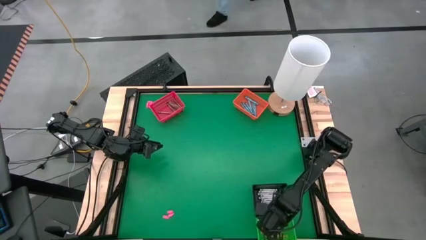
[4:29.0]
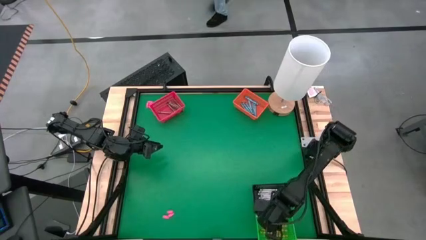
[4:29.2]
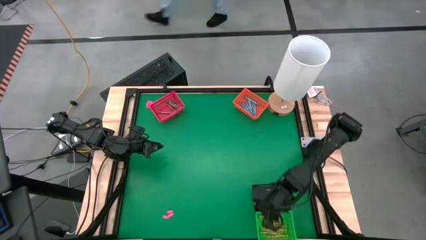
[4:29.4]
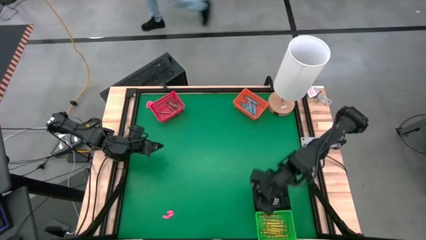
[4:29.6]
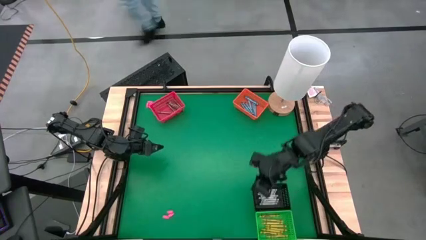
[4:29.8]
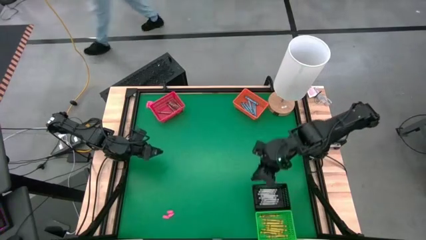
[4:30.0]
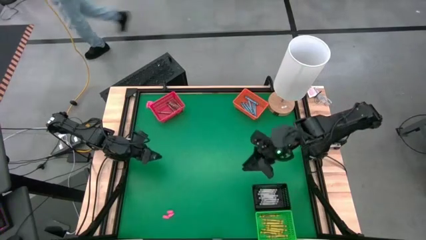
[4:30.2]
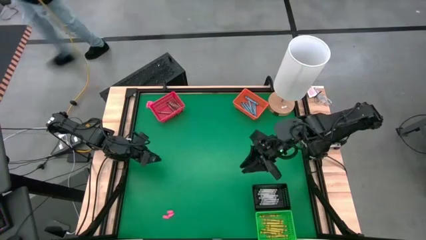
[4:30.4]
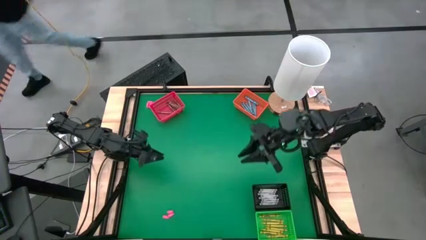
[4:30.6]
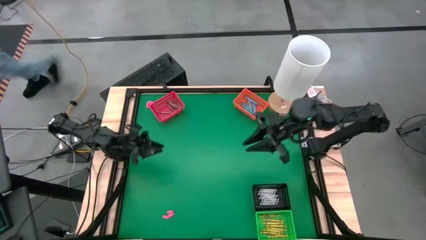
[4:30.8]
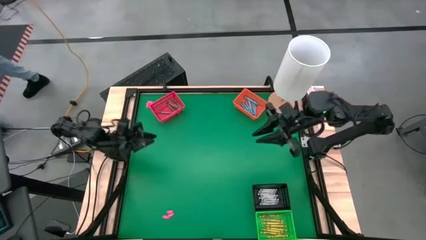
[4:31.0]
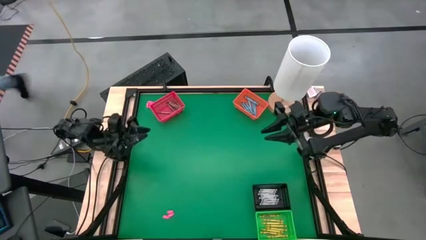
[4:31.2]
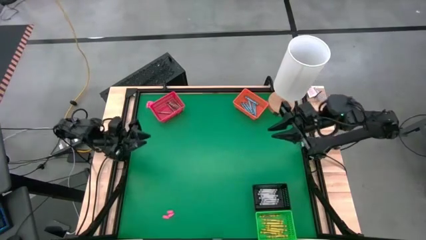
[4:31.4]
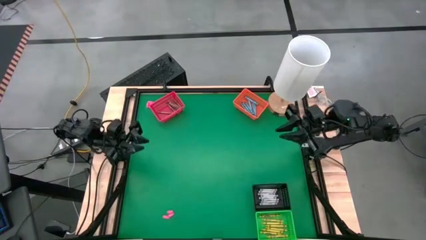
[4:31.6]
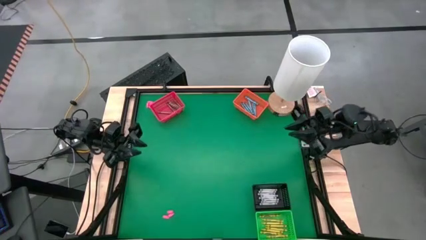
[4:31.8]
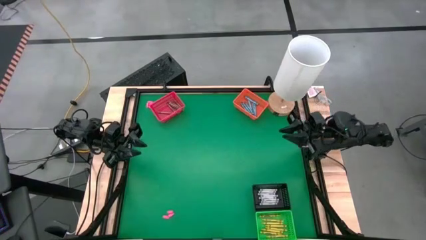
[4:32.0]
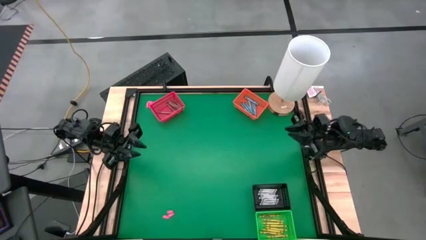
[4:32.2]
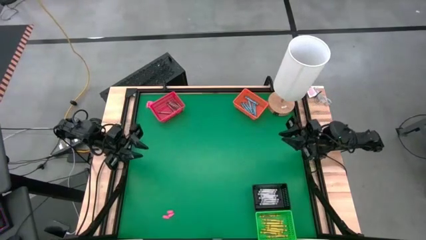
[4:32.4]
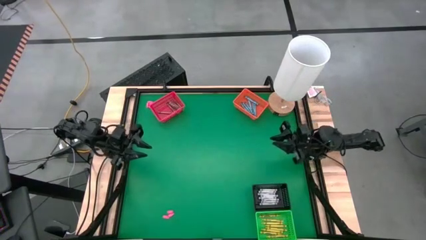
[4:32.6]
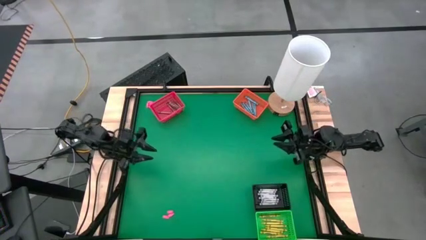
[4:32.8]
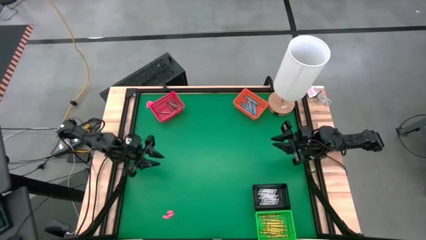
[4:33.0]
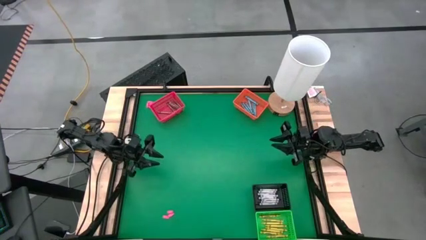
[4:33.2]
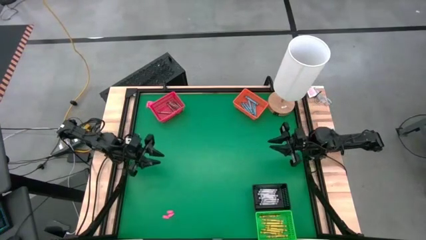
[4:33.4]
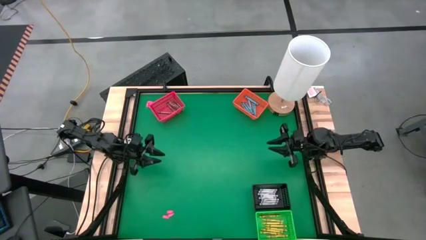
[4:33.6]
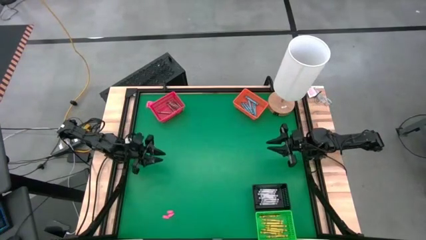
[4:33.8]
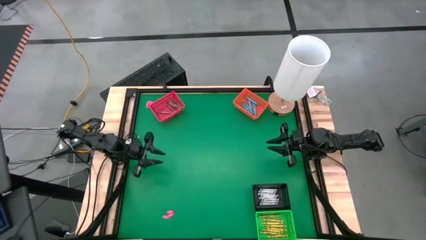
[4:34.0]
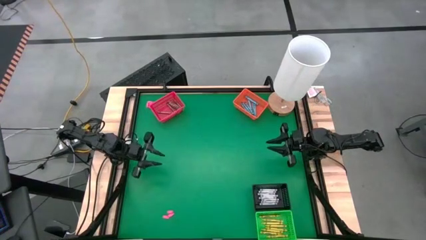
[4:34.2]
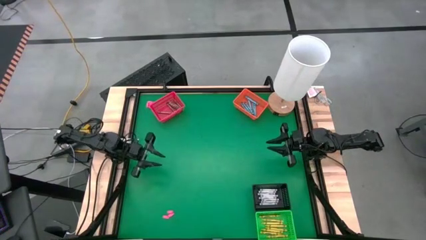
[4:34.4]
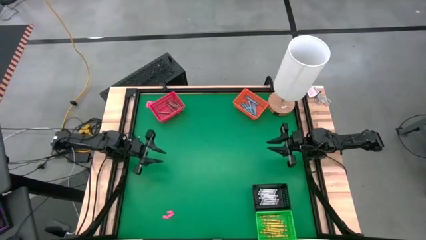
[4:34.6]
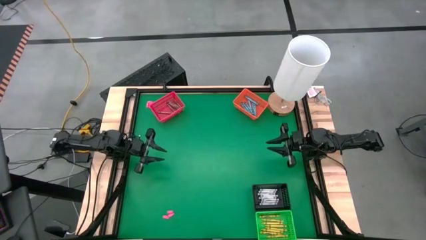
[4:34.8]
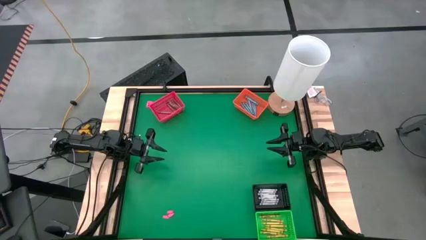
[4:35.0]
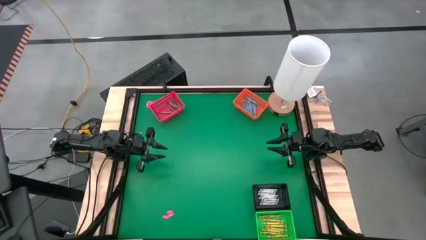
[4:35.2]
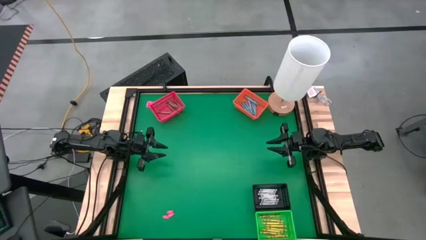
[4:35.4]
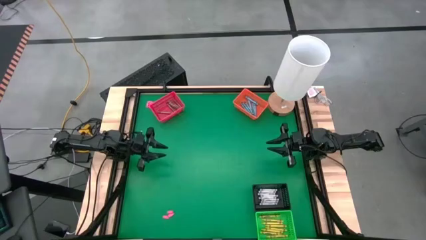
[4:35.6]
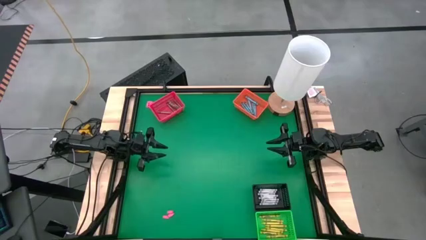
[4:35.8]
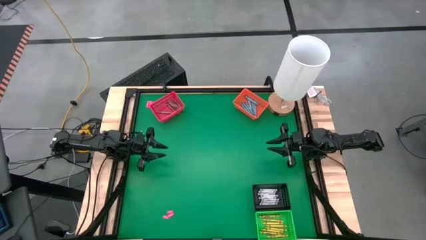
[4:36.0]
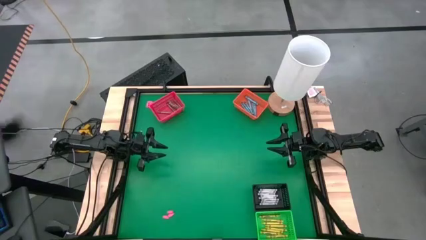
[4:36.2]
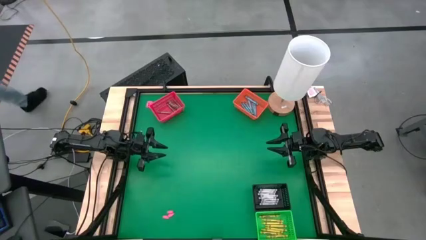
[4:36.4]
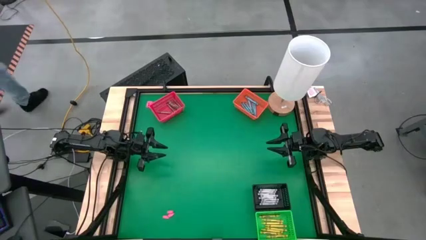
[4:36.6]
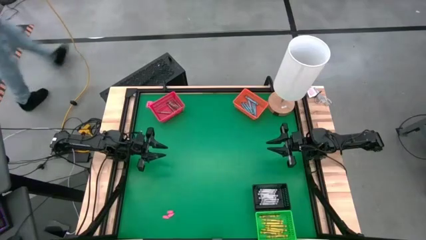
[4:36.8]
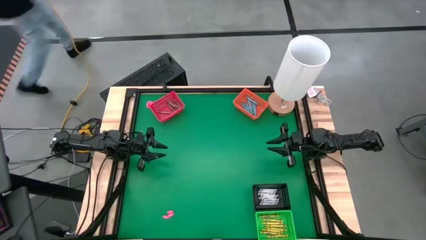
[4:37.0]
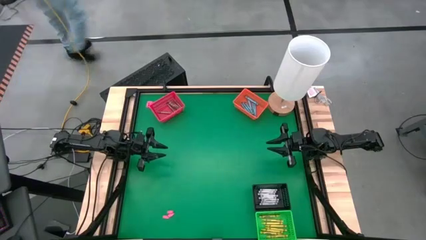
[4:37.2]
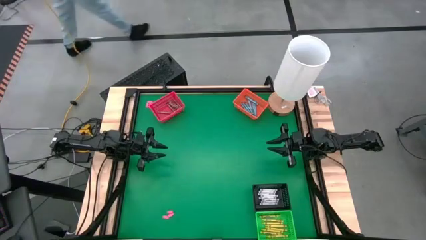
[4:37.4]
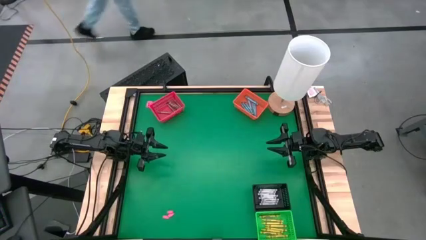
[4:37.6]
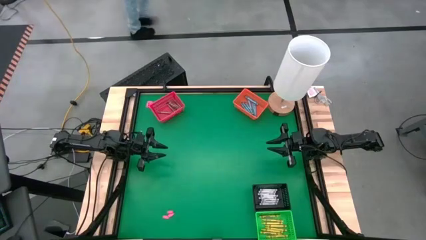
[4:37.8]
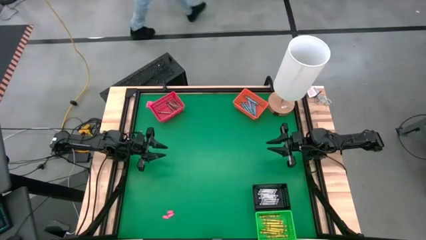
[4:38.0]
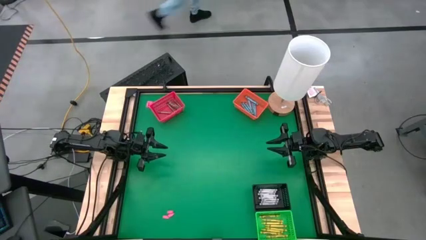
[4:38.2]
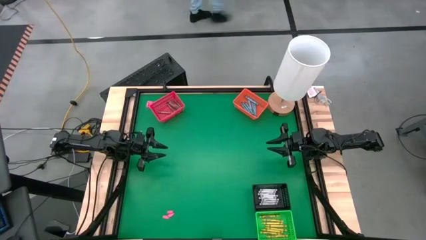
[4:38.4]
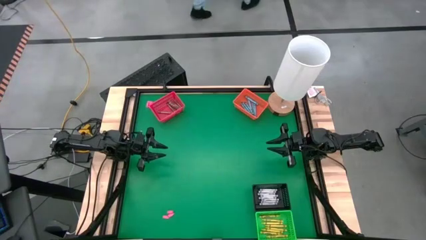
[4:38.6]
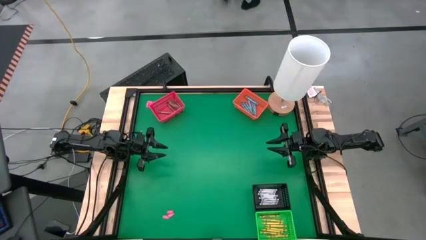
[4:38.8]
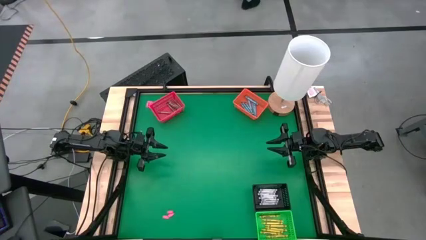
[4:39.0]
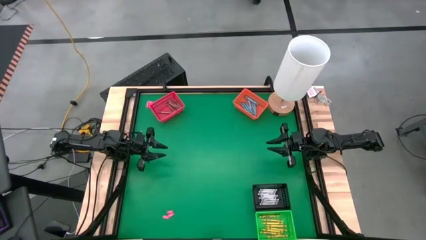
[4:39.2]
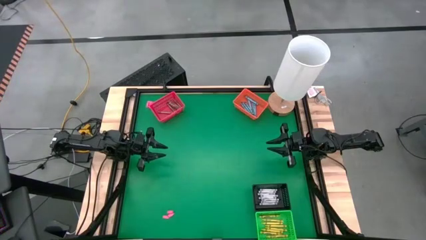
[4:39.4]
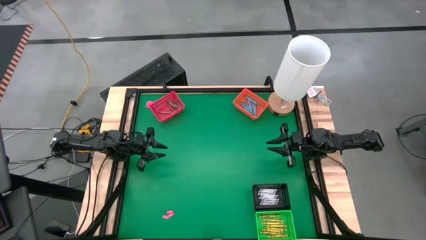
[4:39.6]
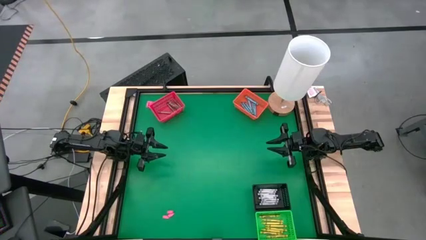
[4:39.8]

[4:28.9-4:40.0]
Task: Sort crayons
Return to Home Position
